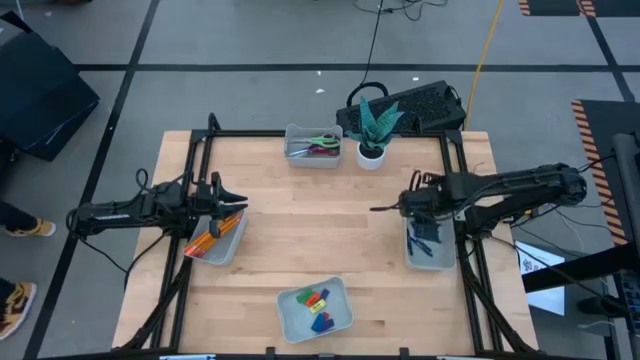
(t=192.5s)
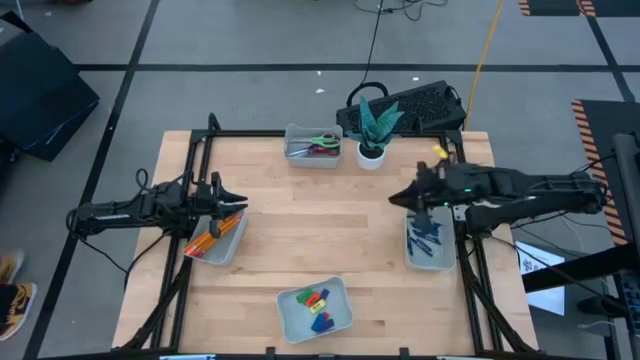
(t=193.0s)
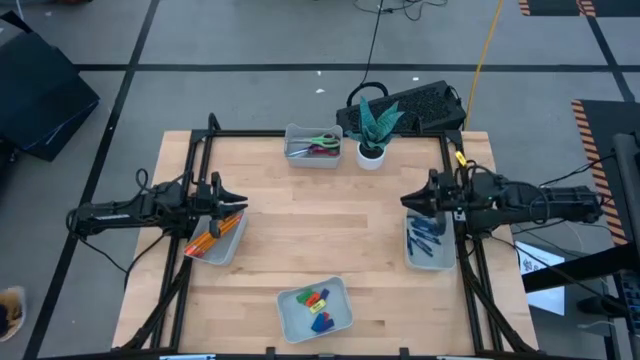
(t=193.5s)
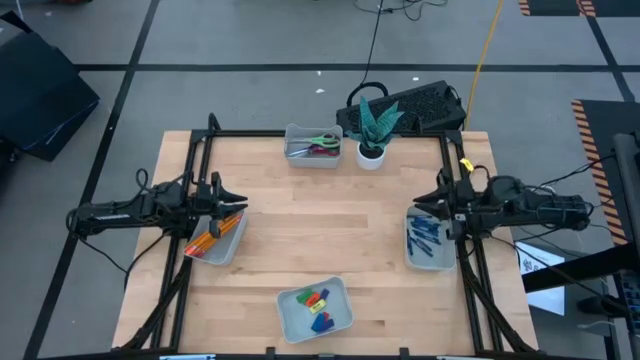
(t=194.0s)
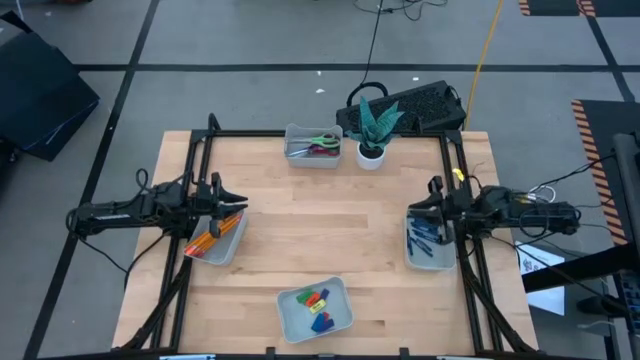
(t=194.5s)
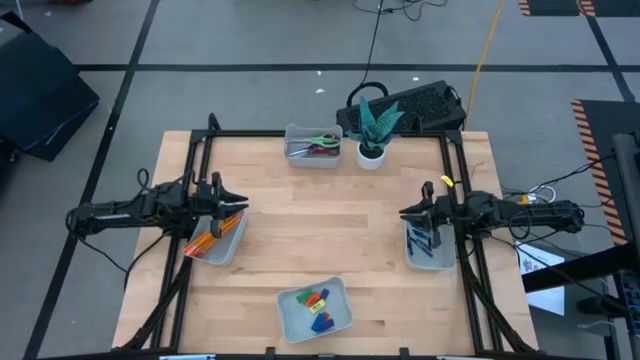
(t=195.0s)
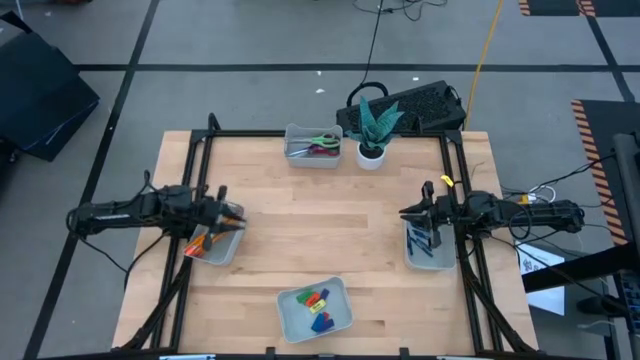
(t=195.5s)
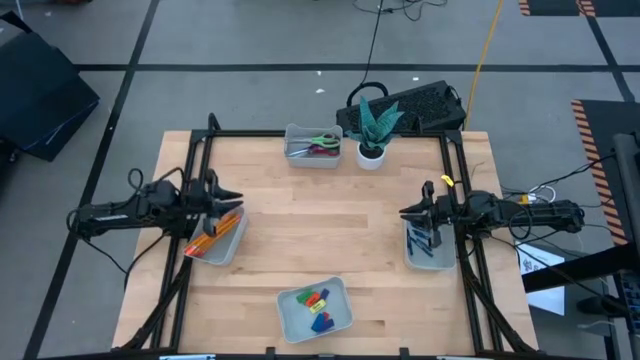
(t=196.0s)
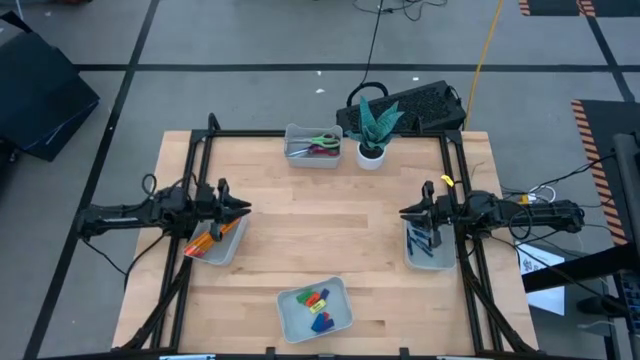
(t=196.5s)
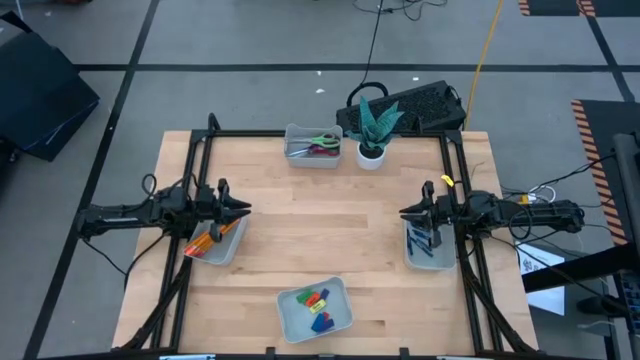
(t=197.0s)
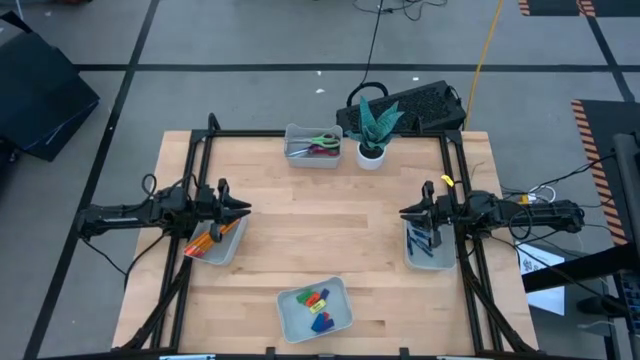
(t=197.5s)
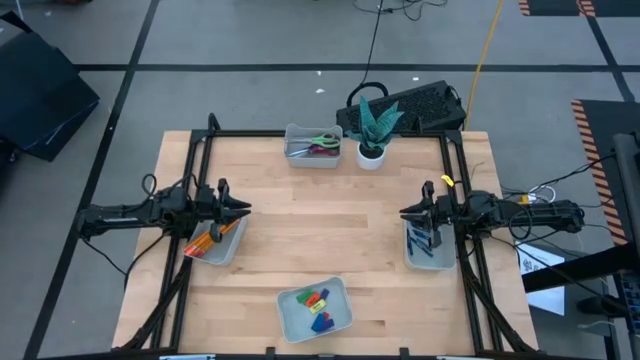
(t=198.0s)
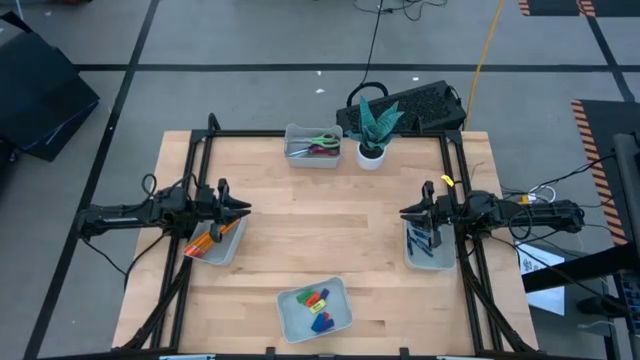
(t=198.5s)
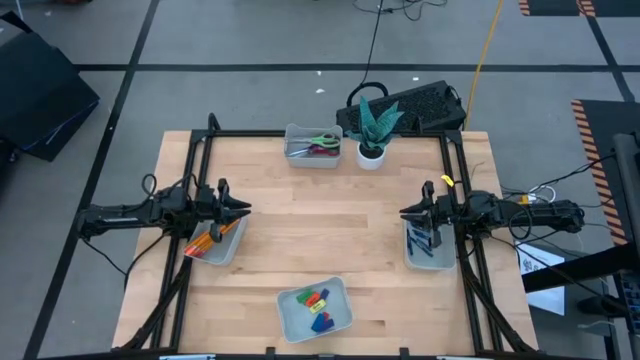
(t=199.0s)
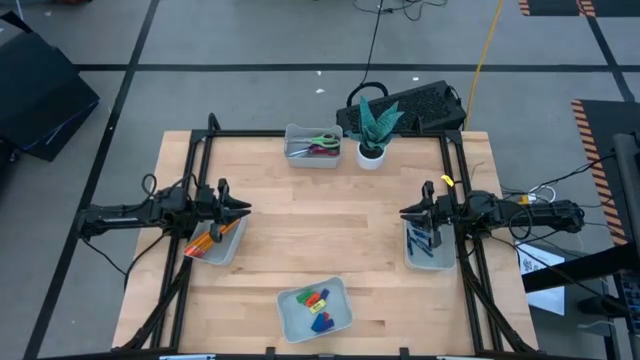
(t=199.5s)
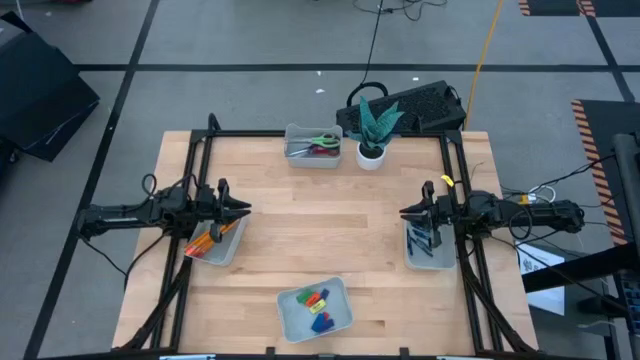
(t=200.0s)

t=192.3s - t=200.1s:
Task: Sort crayons/erasers/pens/pencils in bins
Return to Home Position

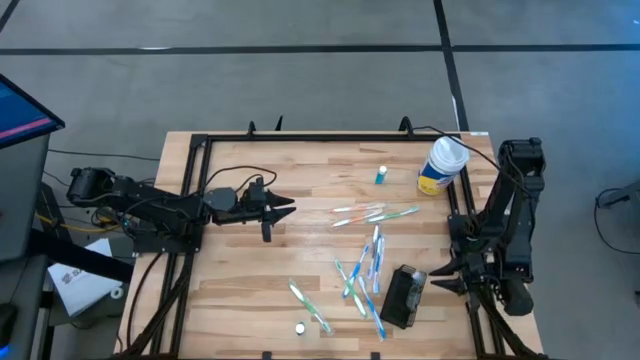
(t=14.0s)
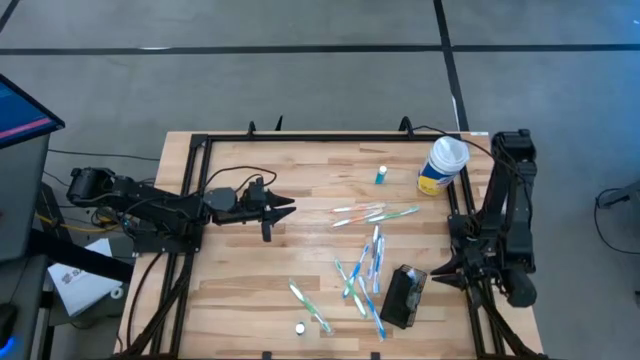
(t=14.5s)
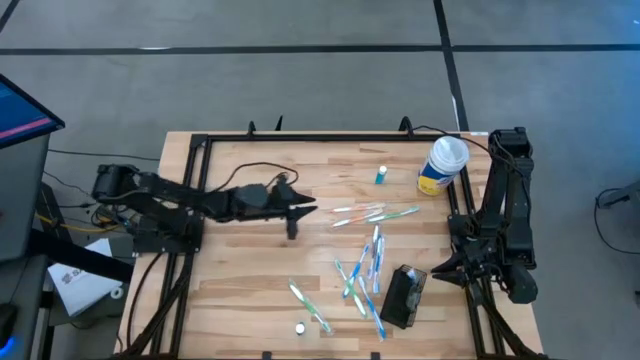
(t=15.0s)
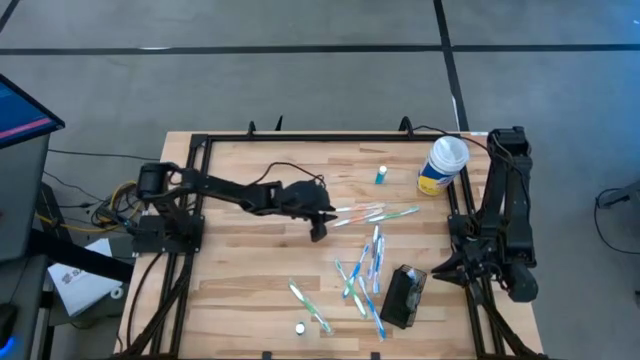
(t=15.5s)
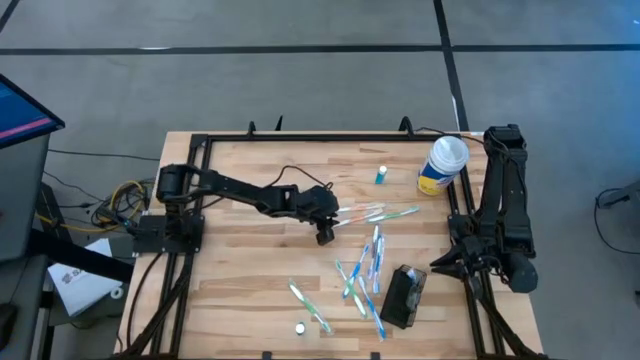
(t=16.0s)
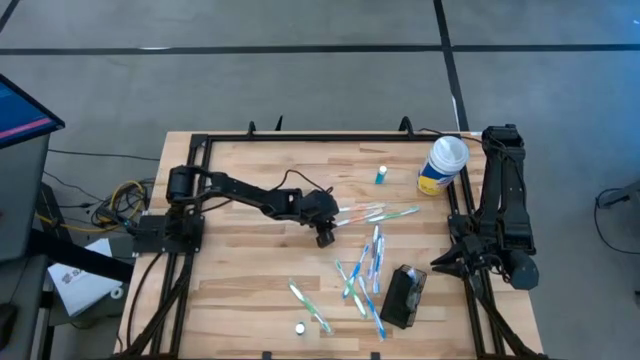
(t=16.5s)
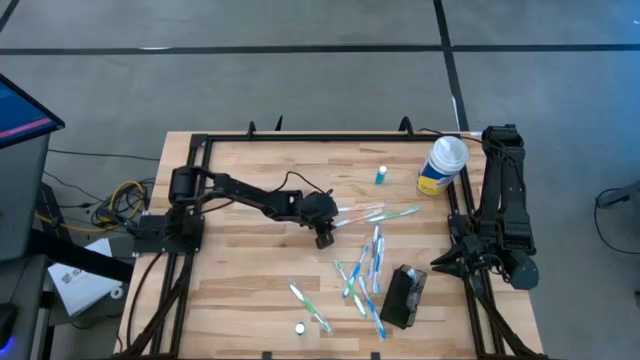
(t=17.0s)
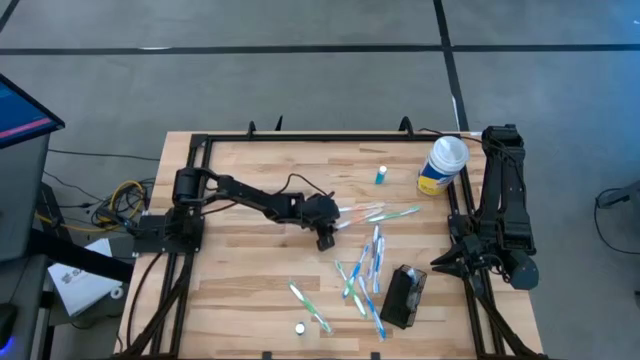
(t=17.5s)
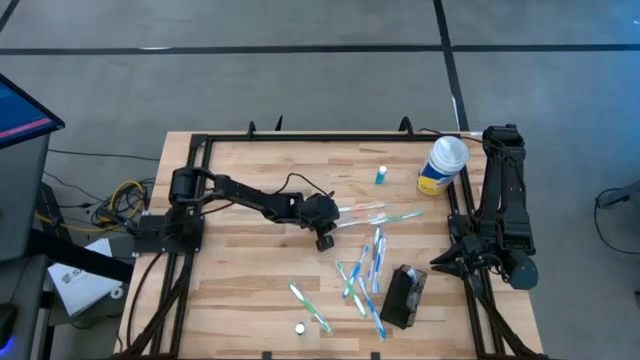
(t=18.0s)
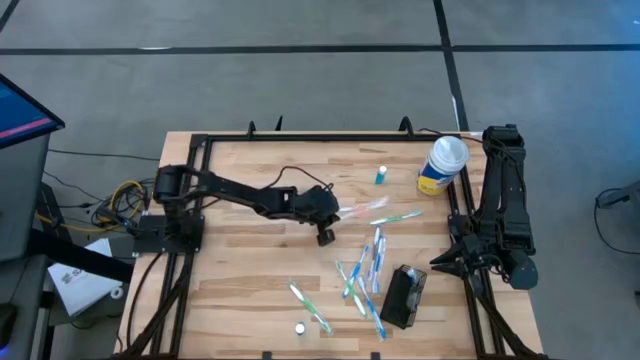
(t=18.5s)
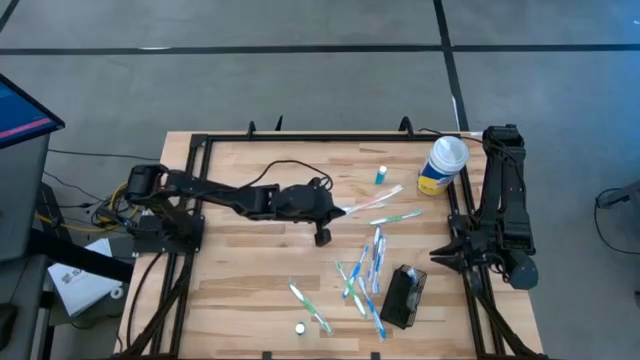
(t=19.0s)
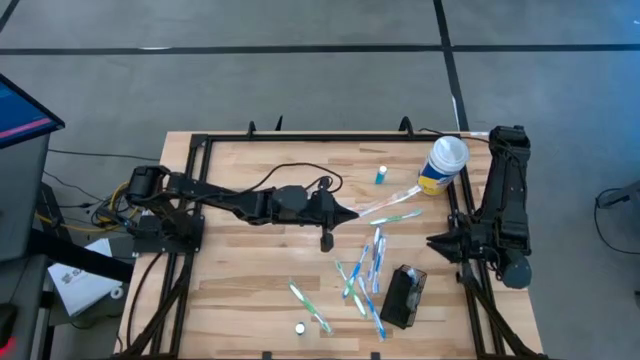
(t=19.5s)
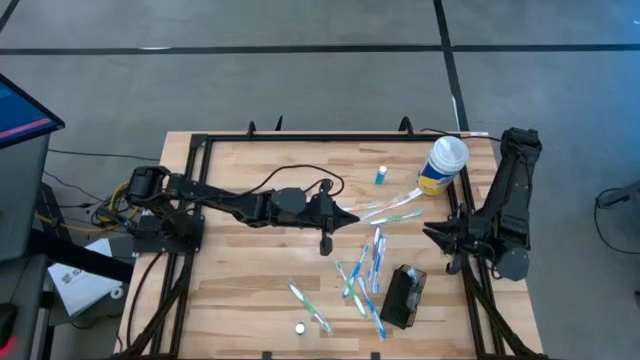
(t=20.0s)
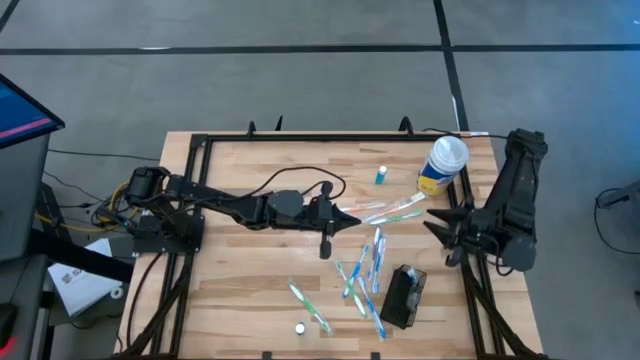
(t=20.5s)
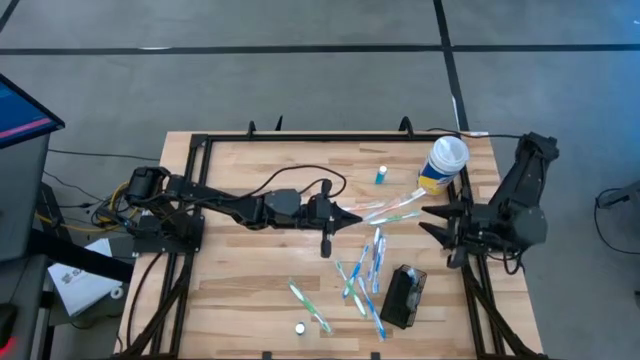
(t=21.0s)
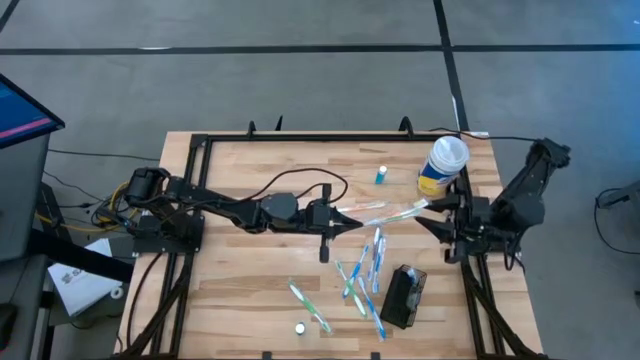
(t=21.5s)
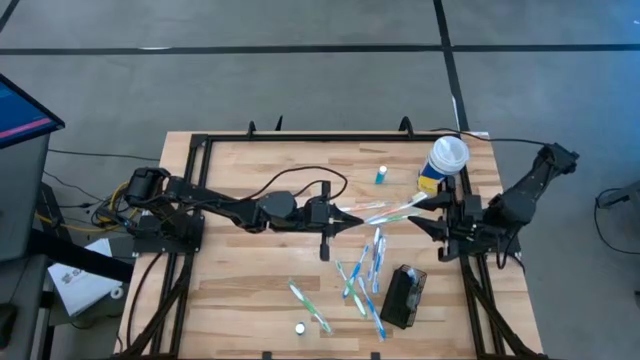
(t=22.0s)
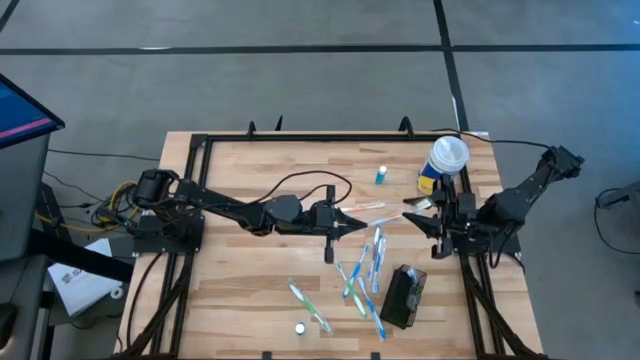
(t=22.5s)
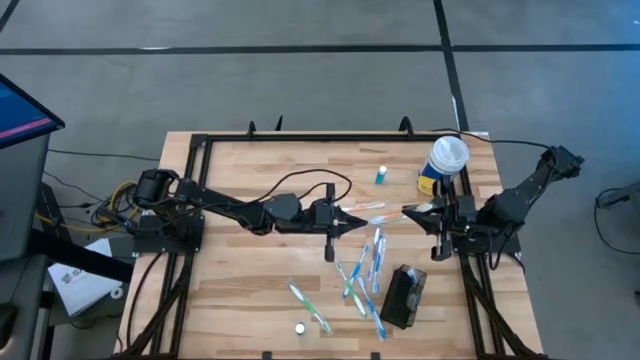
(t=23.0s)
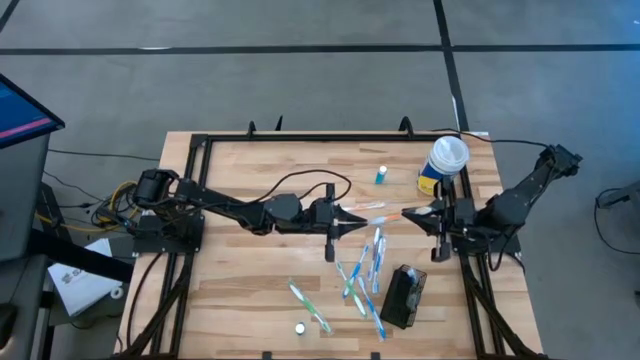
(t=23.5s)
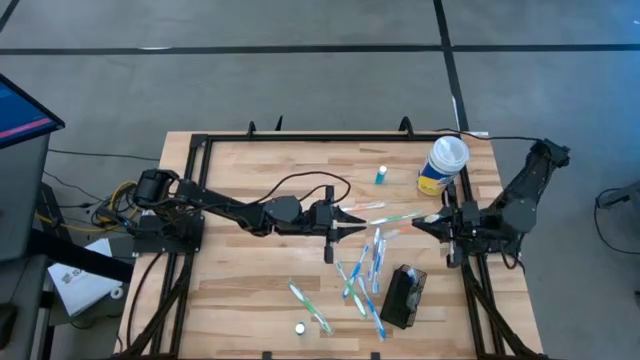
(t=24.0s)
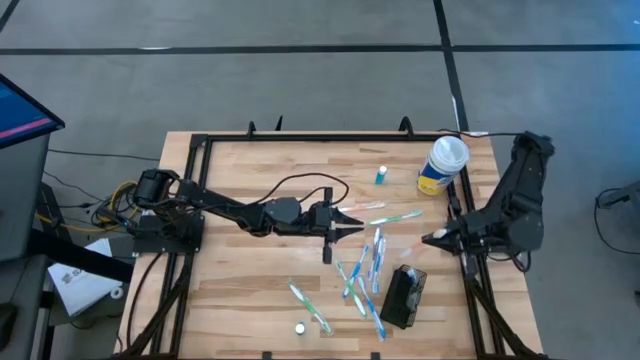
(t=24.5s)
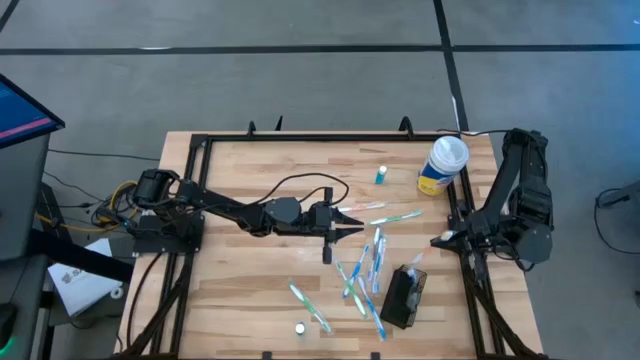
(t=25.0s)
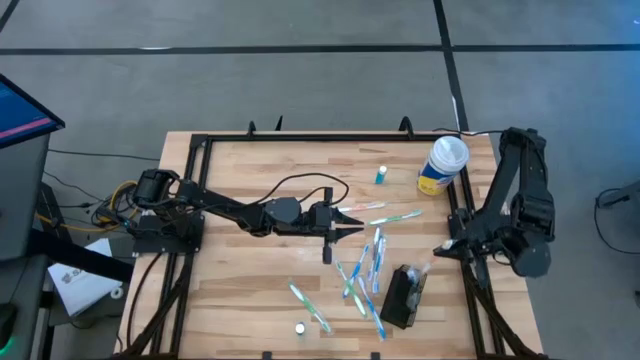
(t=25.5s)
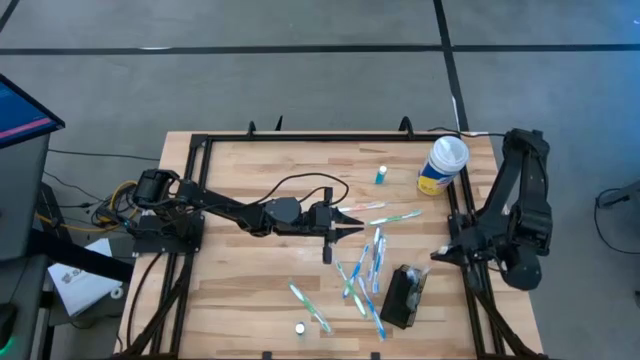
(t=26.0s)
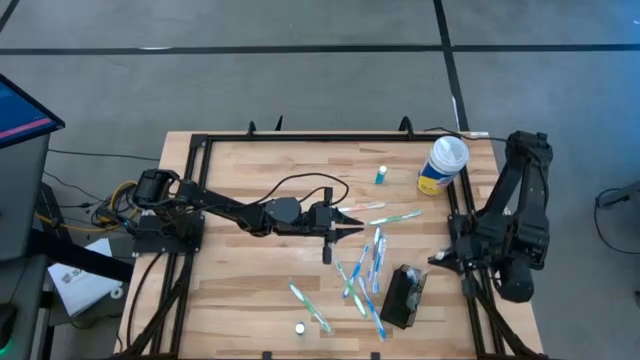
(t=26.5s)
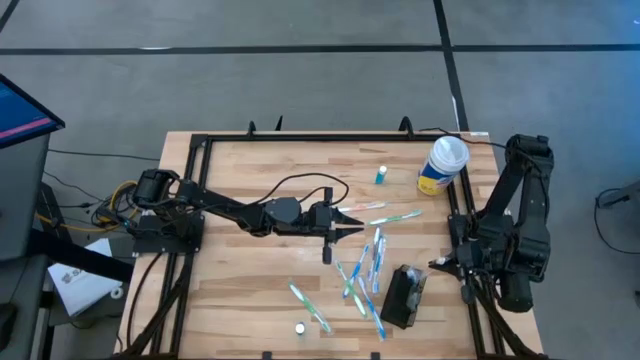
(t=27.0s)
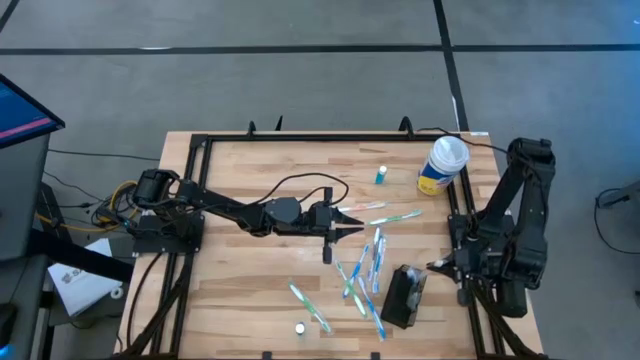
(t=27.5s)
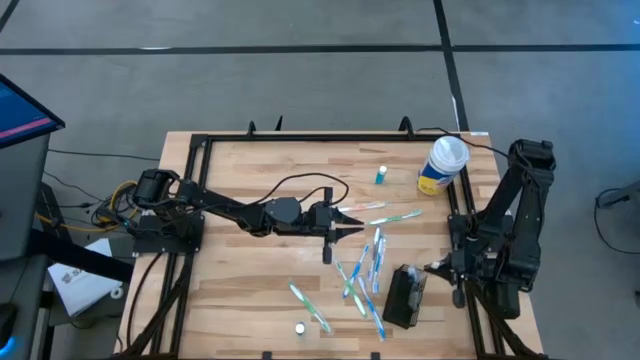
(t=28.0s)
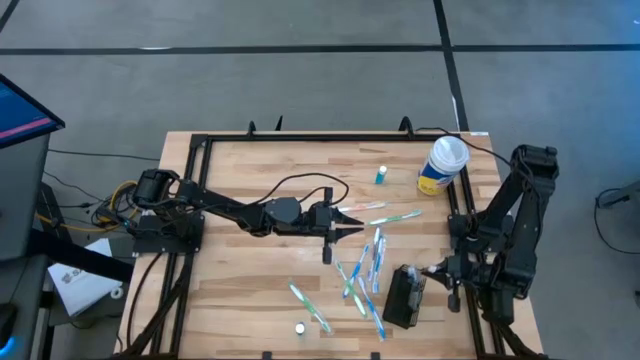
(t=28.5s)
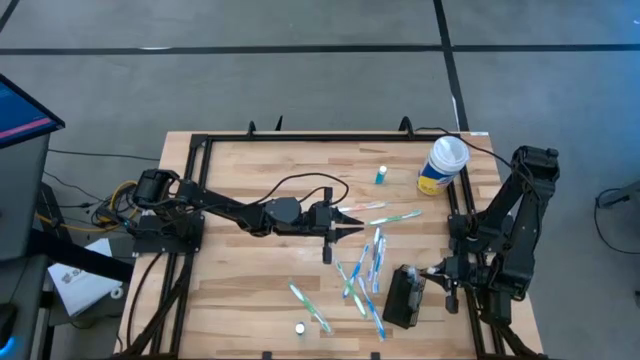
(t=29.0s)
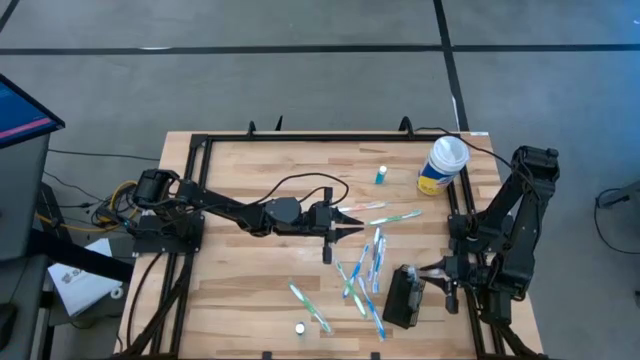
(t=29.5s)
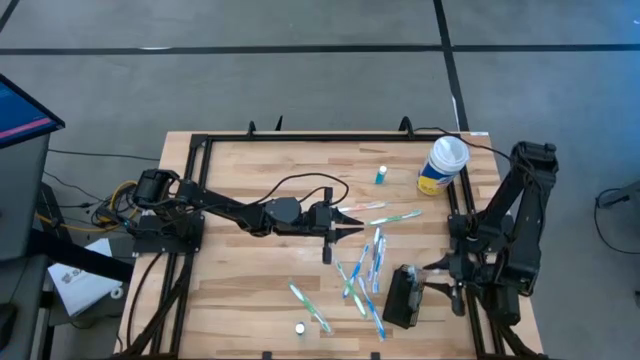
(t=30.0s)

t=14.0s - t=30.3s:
Task: Pick & Place toothbrushing station
Put the orange toothbrush into the black wire organizer
